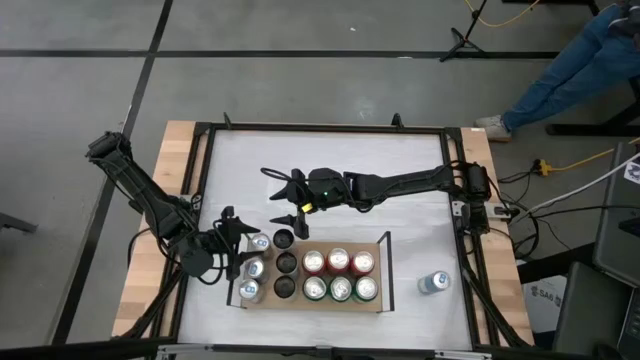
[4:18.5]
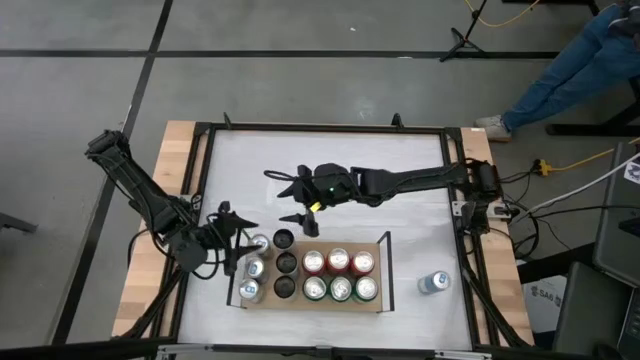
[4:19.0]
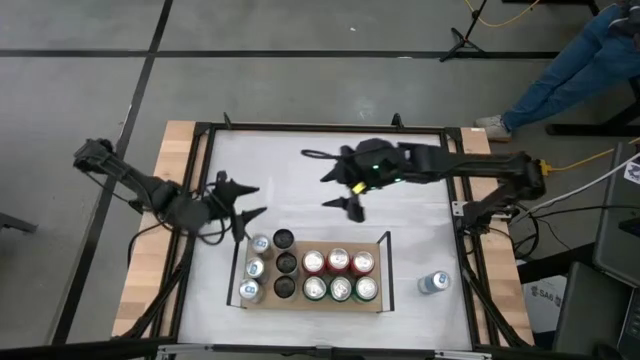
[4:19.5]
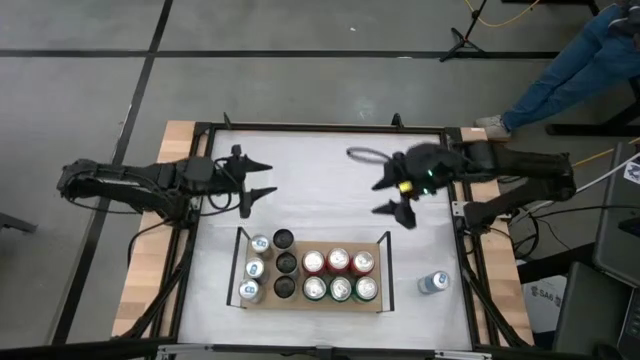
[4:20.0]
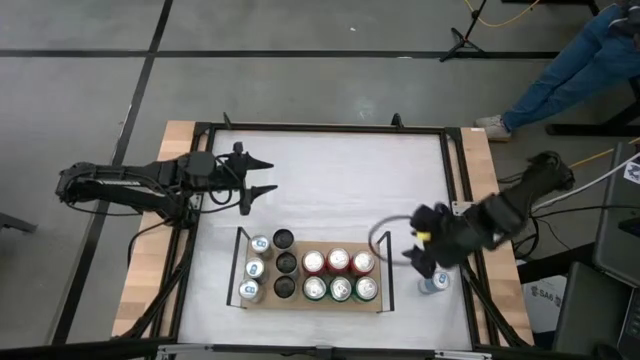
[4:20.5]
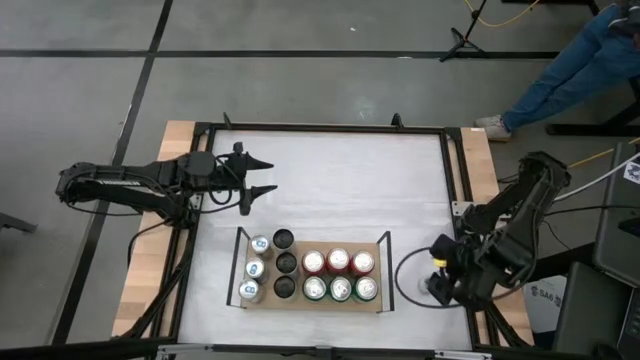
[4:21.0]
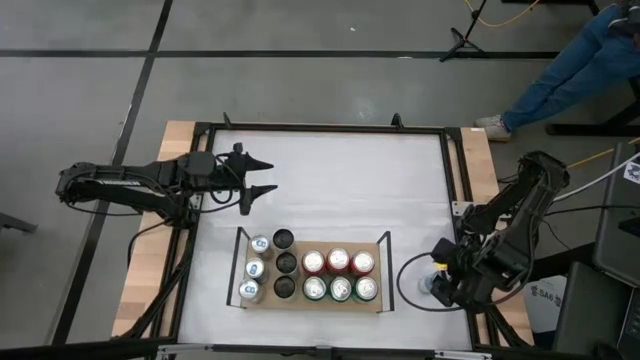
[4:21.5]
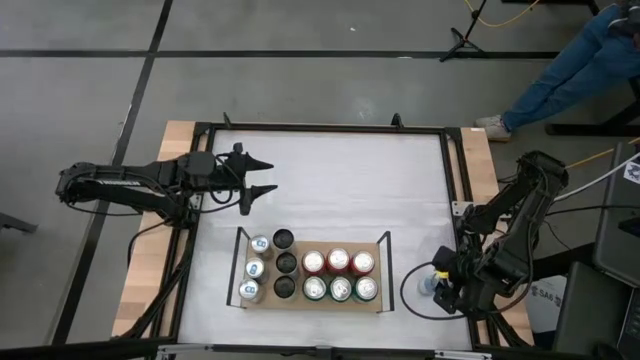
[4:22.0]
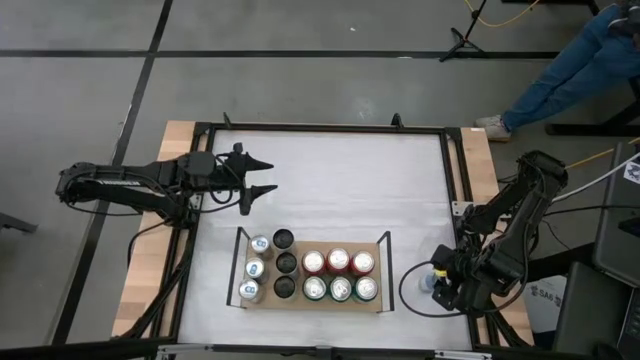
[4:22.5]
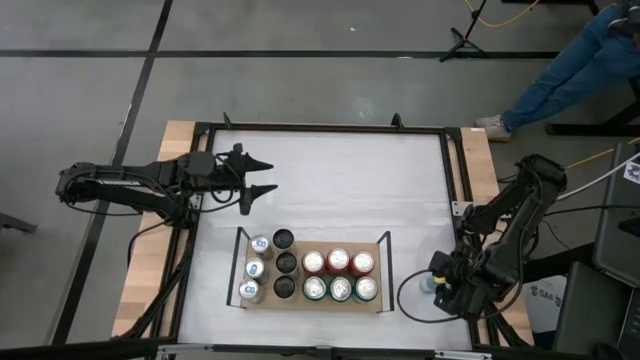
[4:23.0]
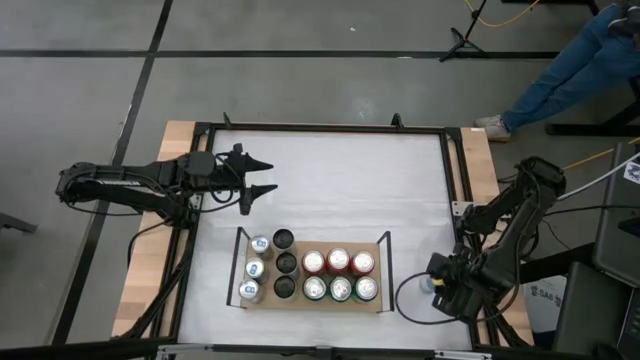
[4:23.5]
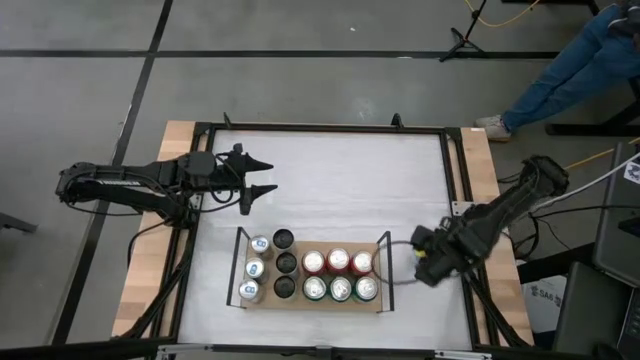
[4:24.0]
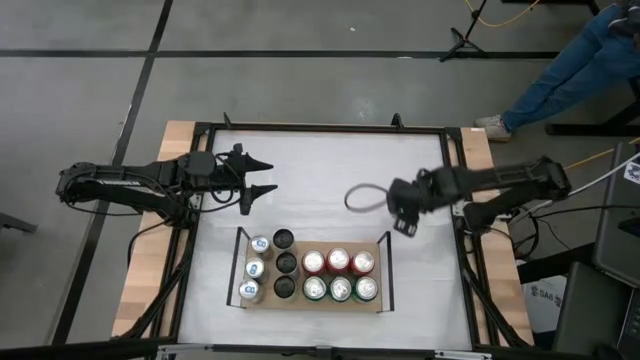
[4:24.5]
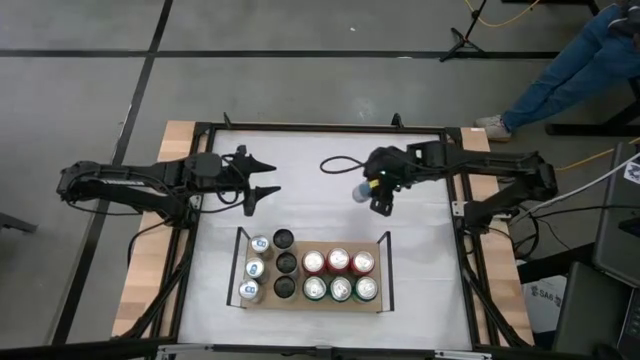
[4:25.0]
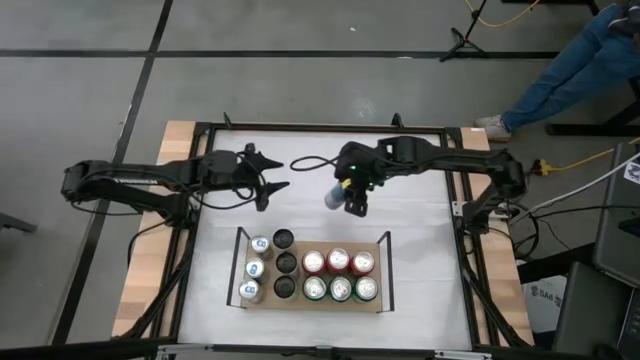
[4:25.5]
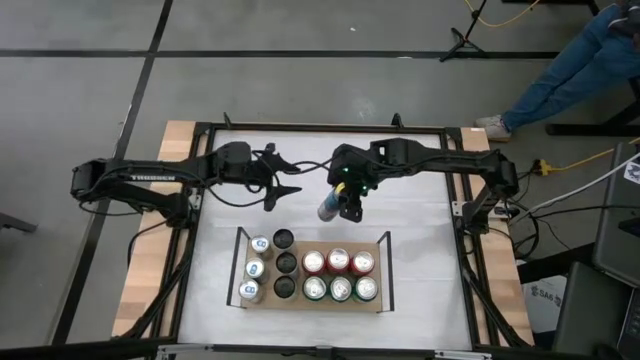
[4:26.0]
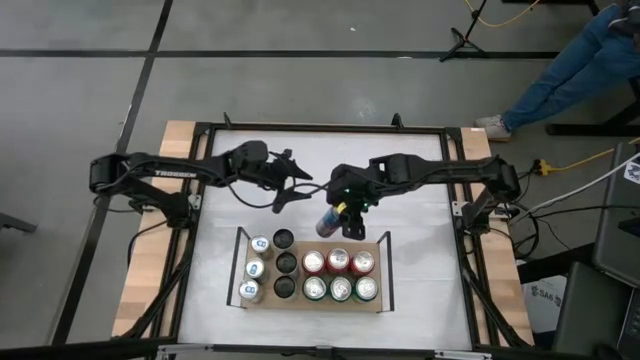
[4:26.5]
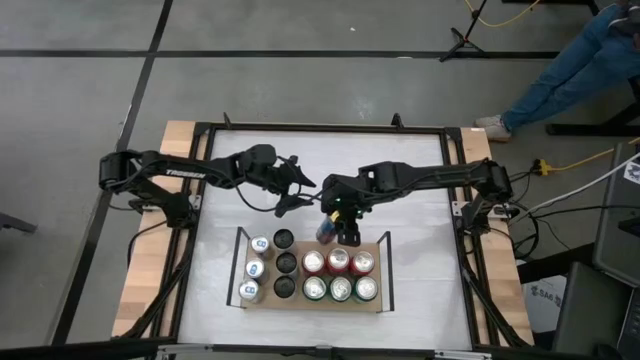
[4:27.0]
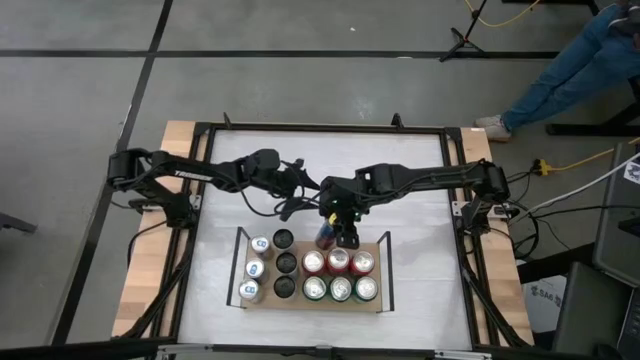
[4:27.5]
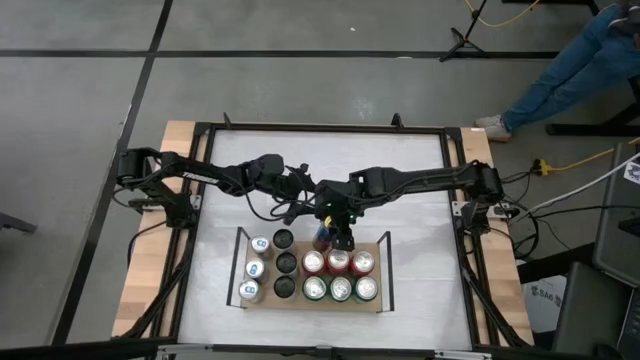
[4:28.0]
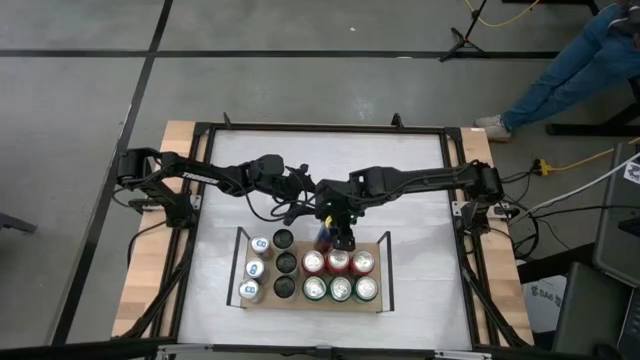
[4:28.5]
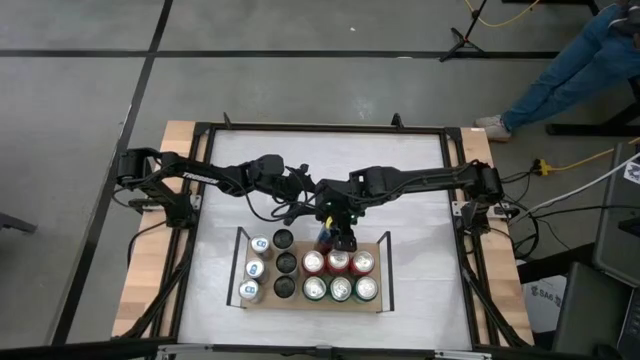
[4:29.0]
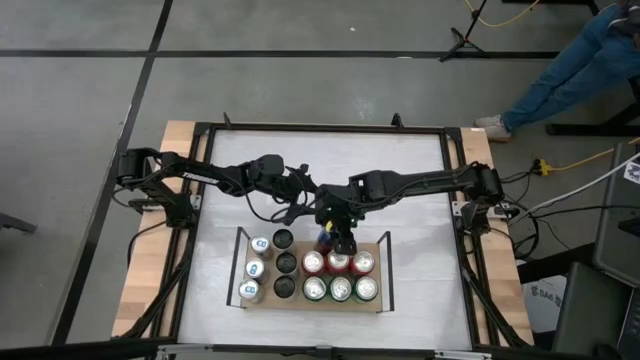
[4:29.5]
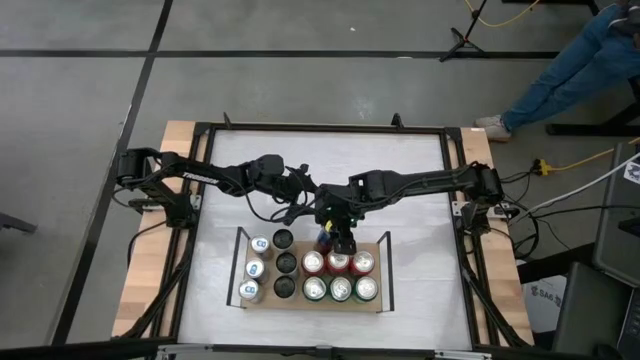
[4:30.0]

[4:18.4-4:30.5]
Task: Place canned beverage on shelf
Put the blue soda can on the shelf

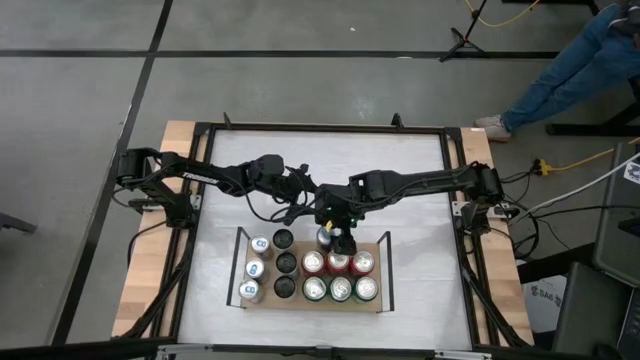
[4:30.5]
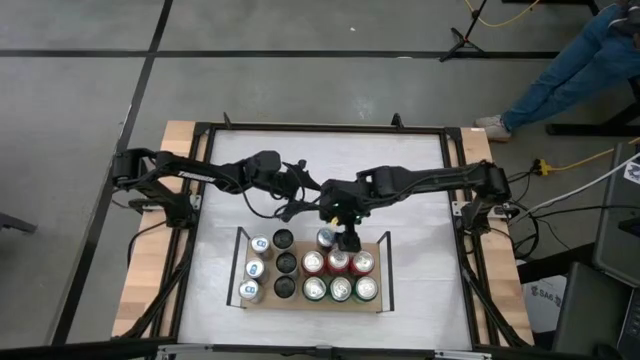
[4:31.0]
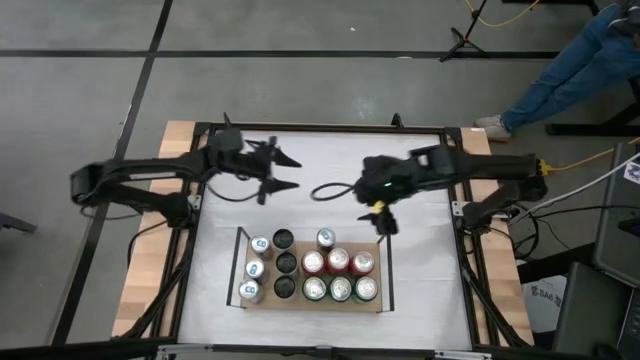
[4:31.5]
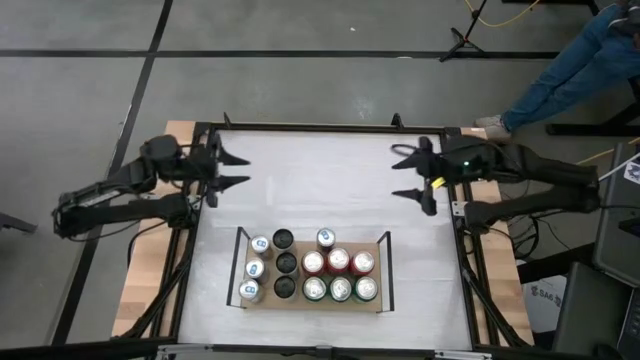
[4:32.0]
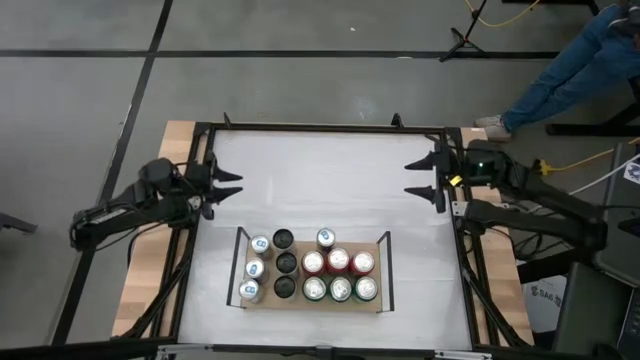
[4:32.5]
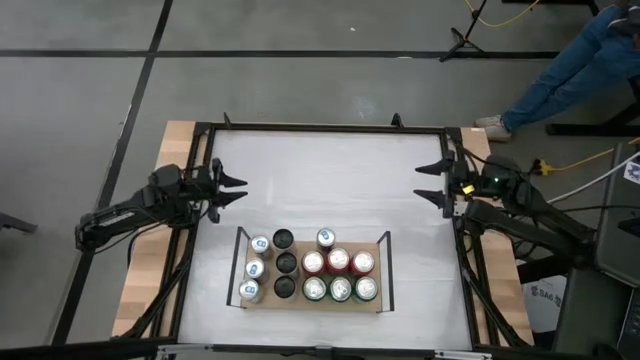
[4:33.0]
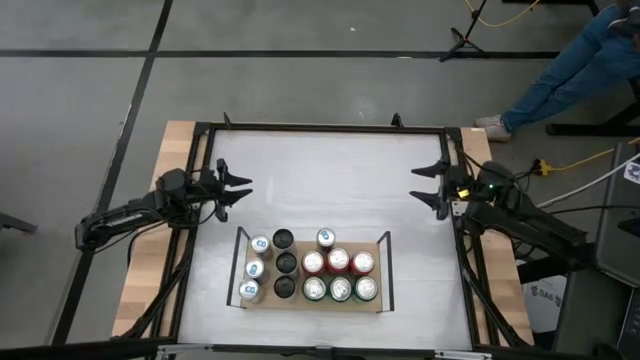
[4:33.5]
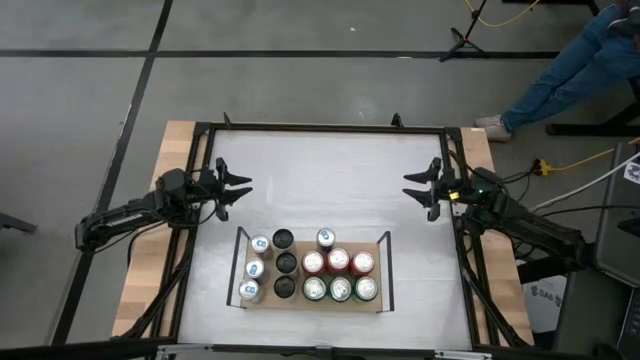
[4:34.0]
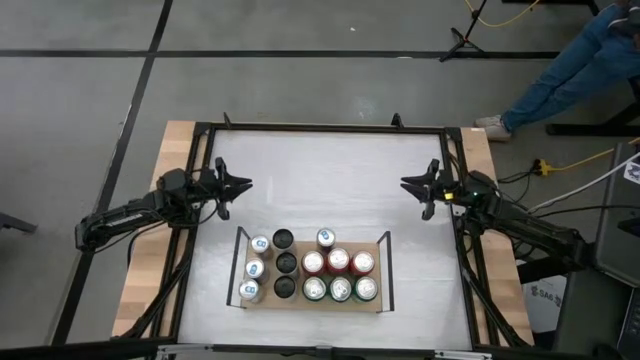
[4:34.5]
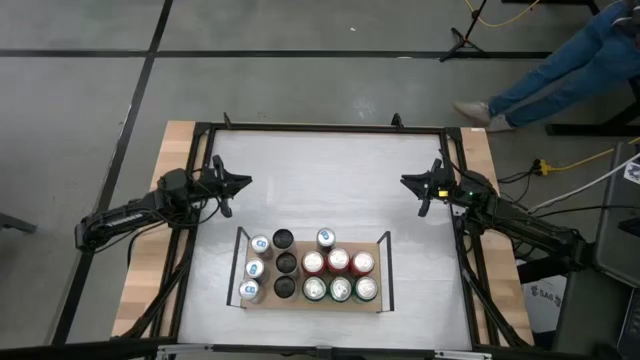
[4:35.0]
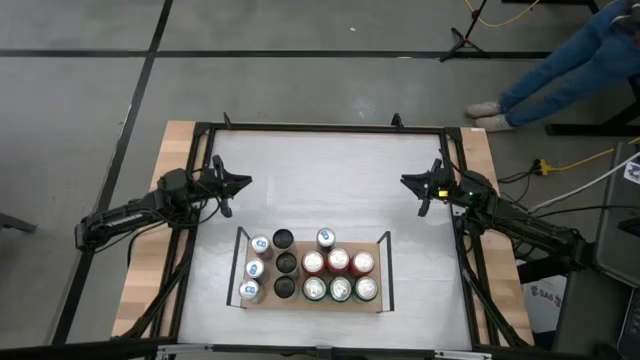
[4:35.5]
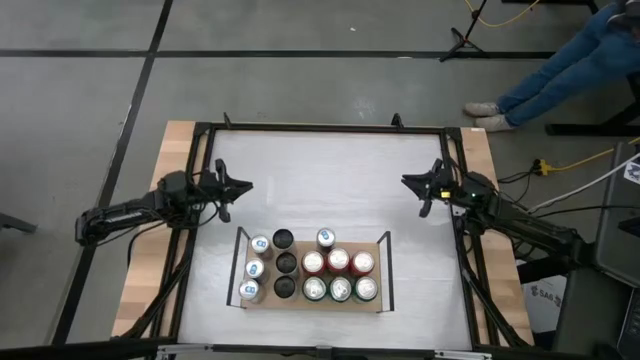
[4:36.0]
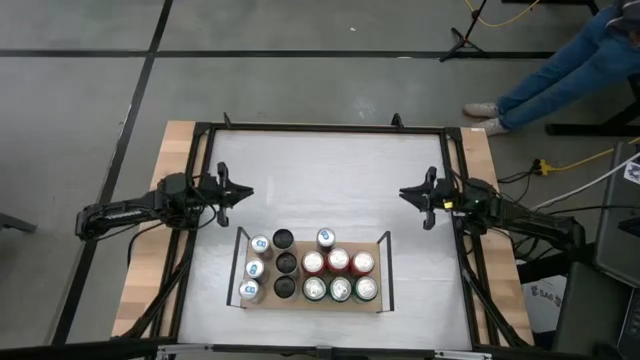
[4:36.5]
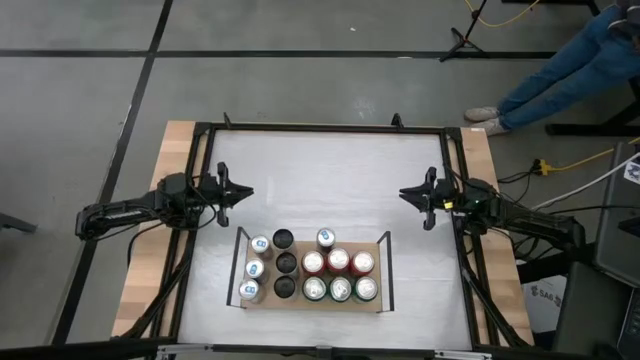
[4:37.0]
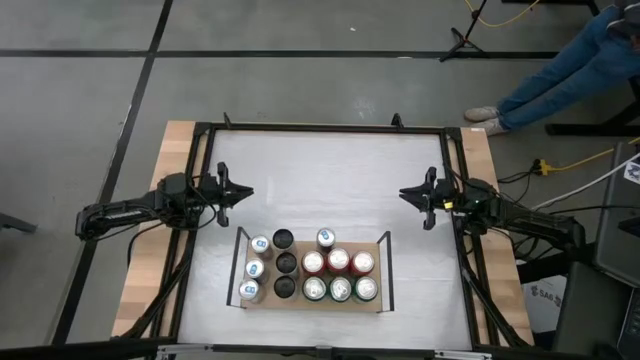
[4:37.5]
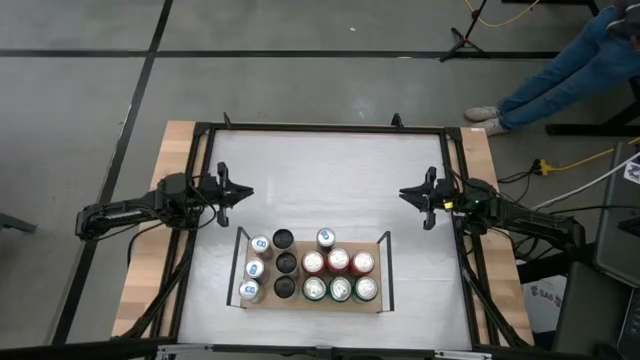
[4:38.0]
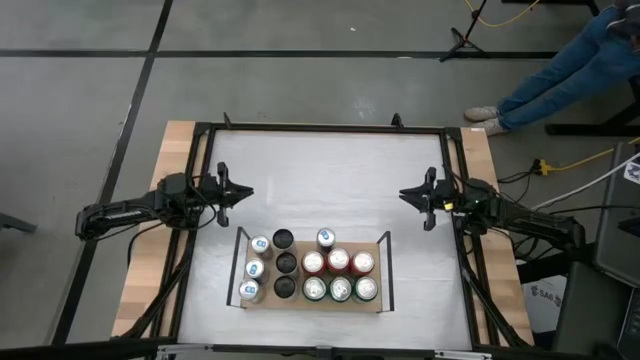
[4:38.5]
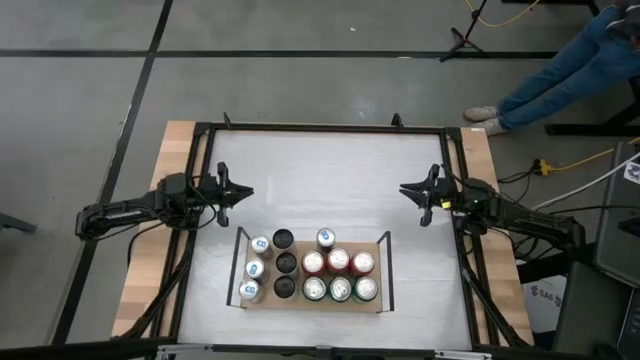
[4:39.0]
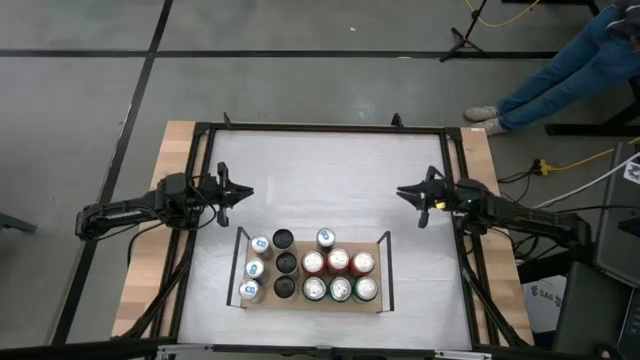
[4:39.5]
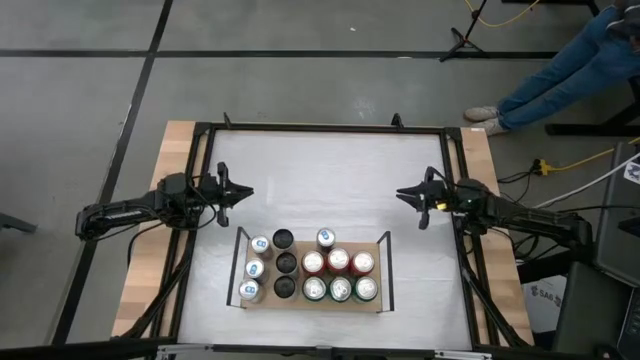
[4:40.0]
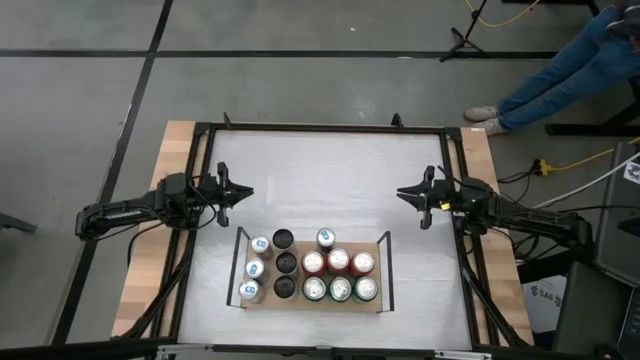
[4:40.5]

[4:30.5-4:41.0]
Return to Home Position
